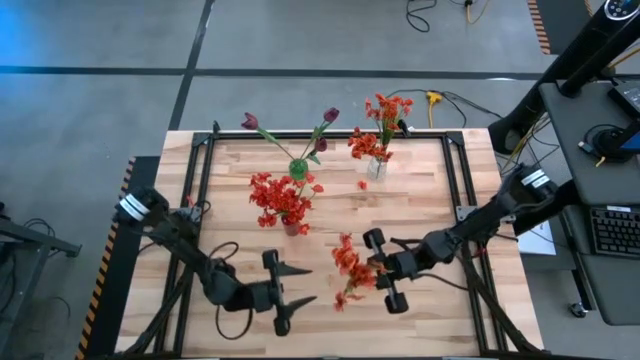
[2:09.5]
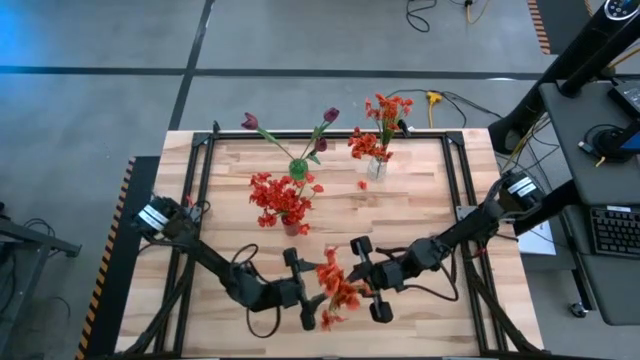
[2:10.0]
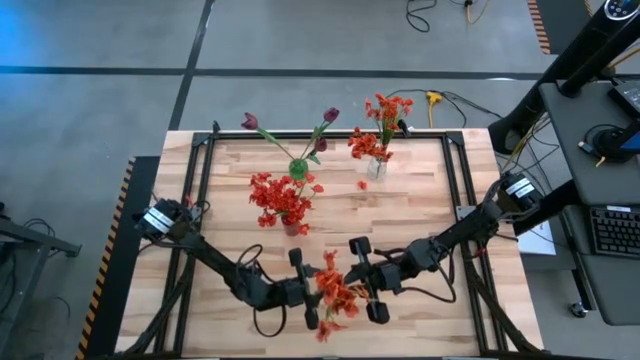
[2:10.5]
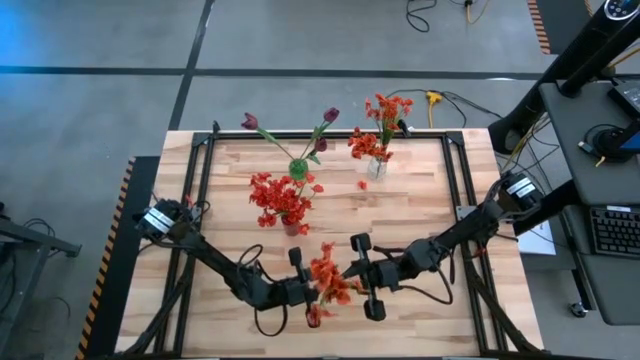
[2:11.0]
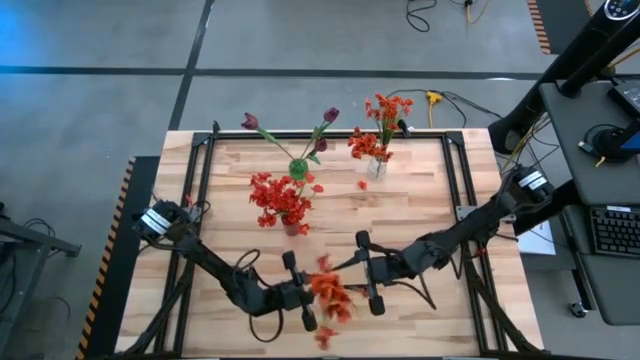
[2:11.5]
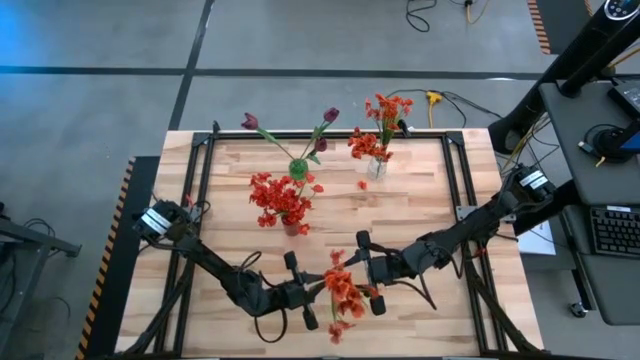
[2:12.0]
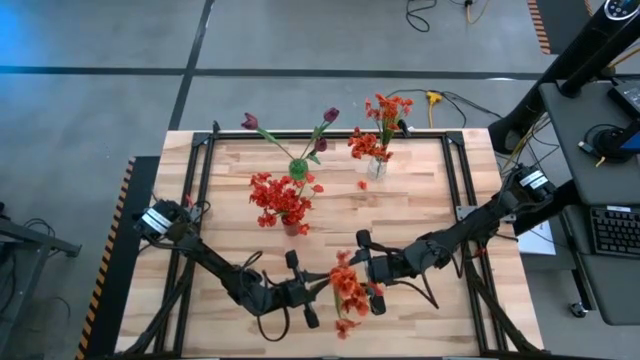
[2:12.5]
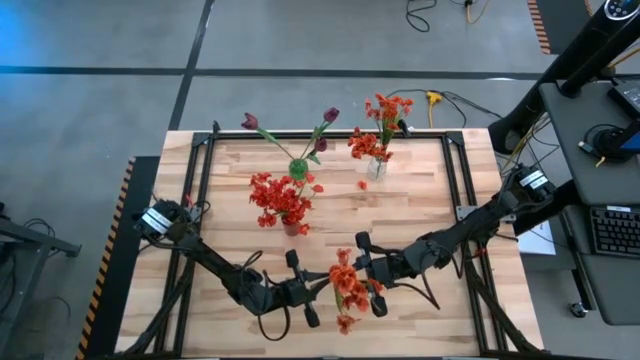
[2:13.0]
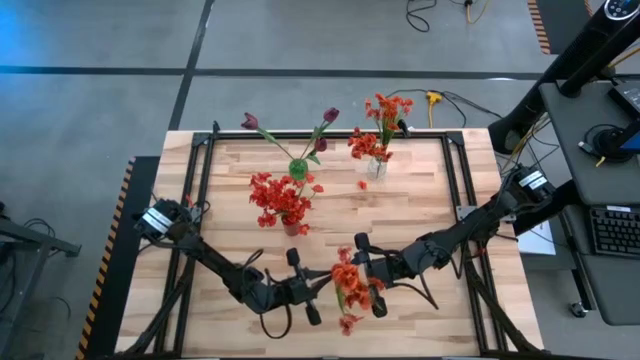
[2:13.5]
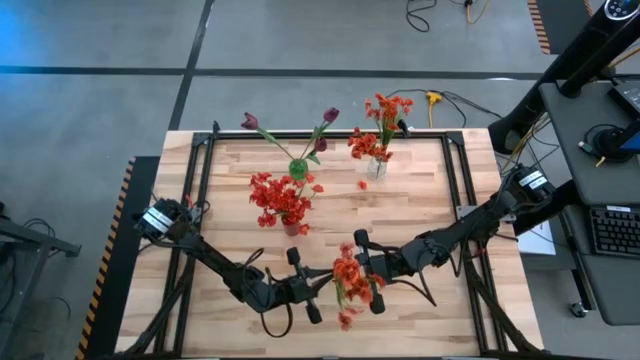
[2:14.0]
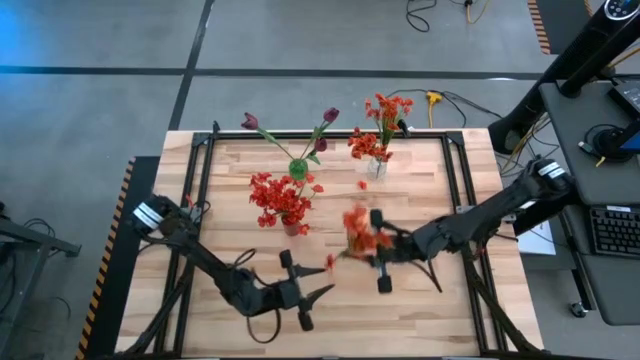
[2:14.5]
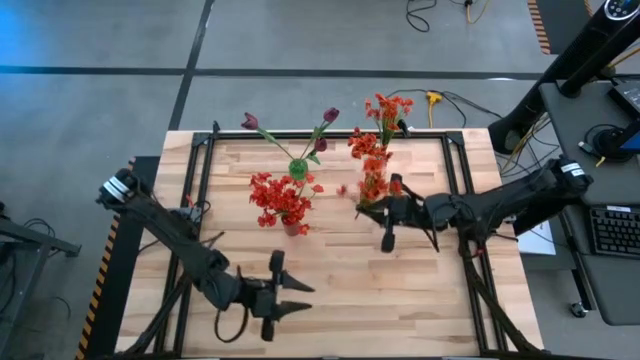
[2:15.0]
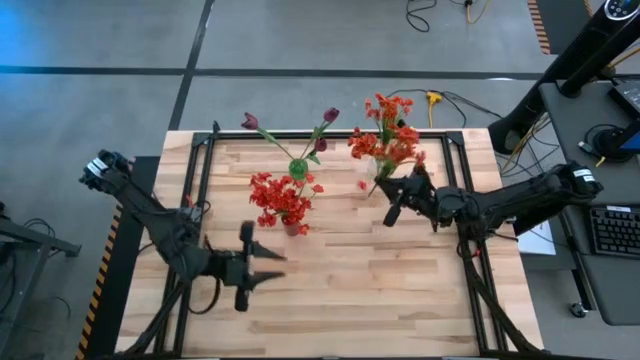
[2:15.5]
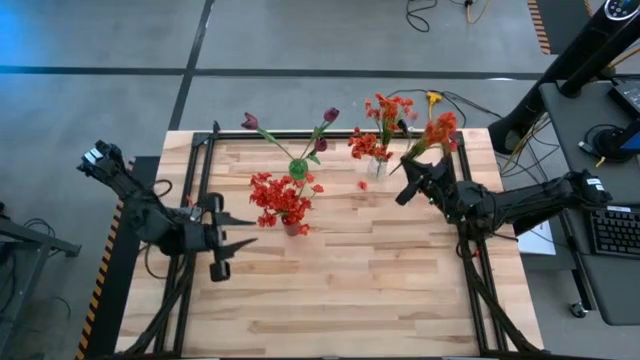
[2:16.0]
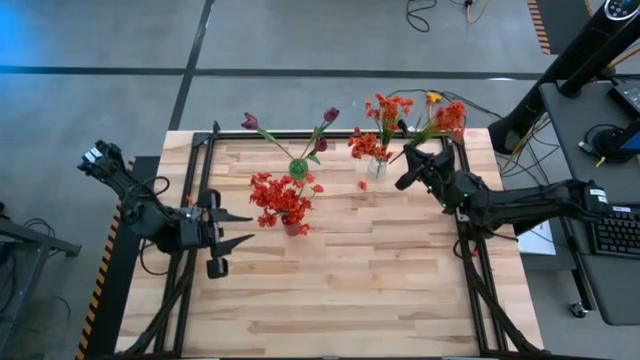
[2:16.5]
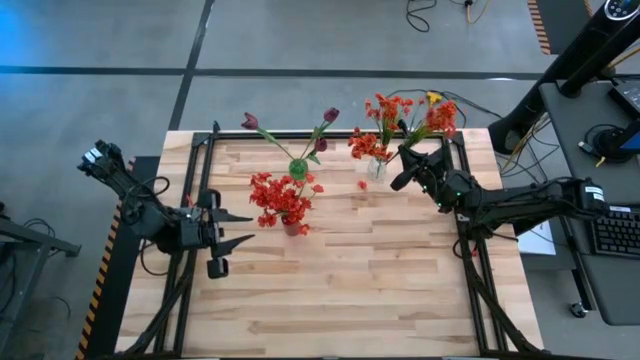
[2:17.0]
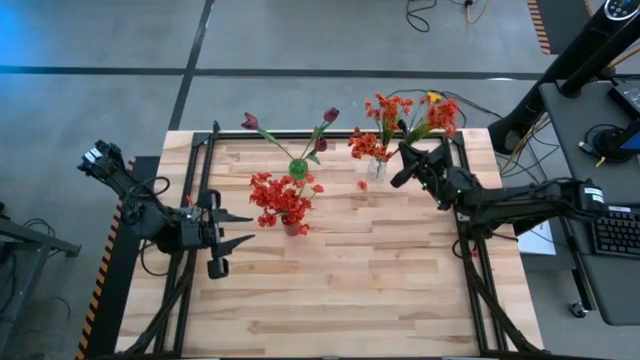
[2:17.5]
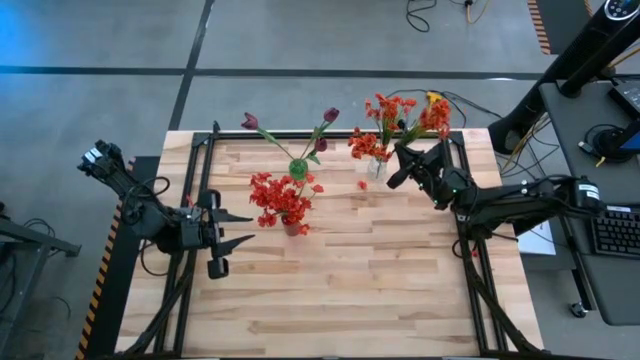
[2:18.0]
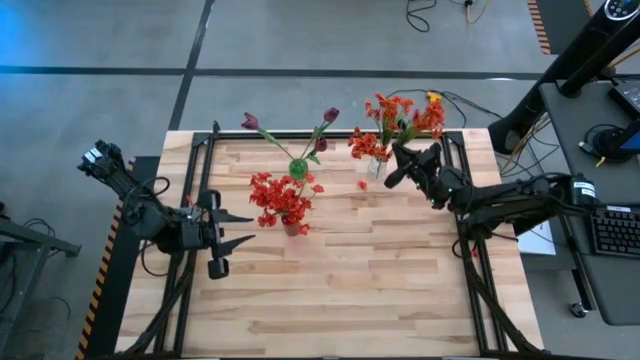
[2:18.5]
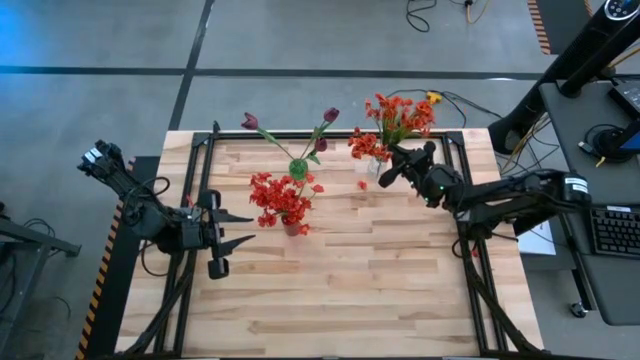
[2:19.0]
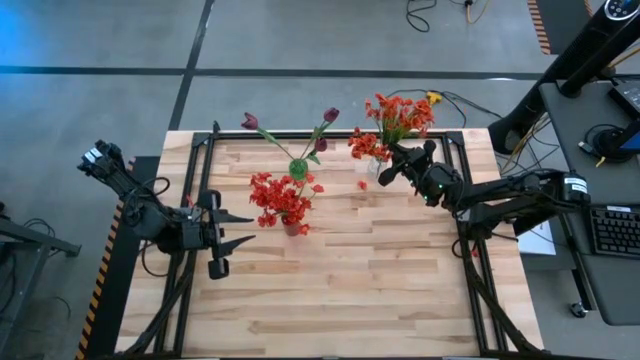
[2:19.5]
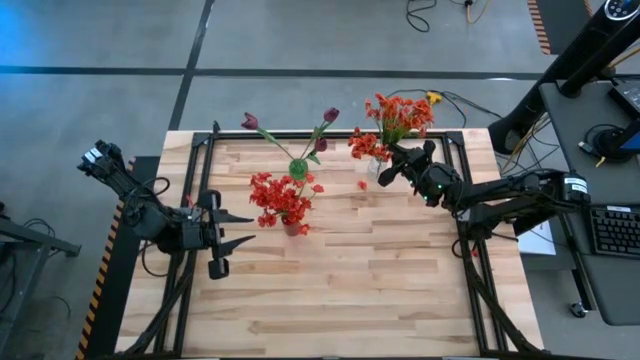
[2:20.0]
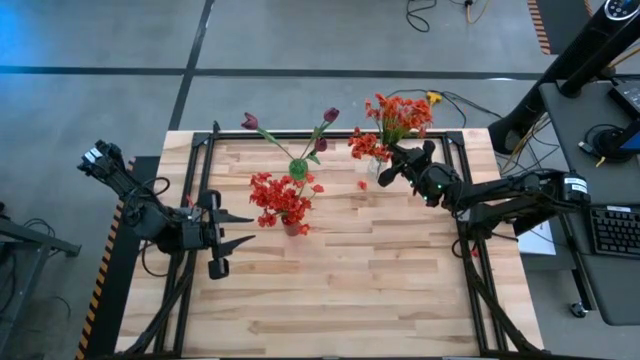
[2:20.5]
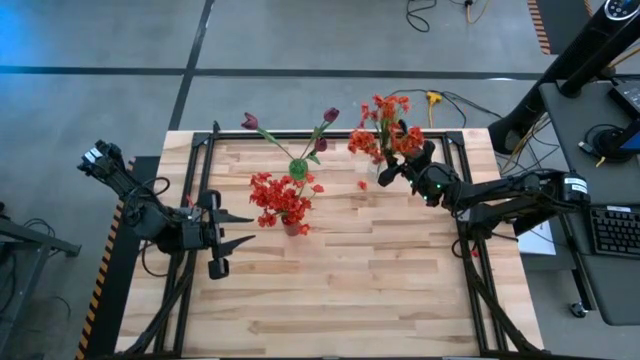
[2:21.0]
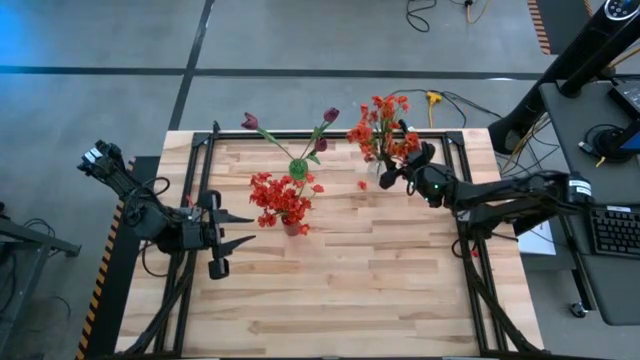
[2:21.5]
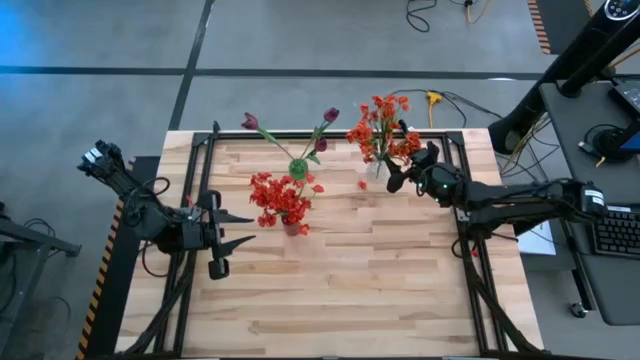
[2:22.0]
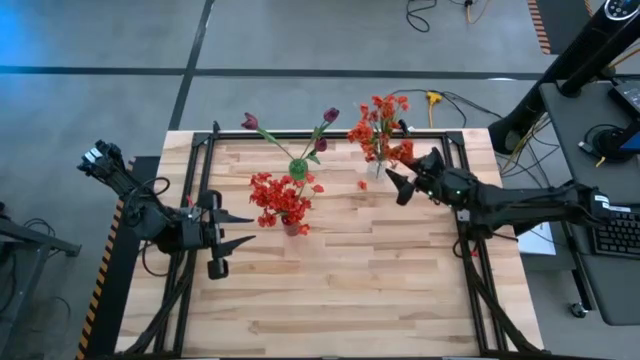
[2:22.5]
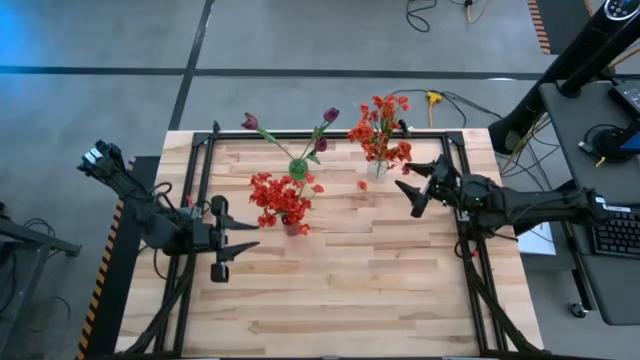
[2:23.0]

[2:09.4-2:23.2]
Task: Sort flowers into vase by color
Put the orange flowers into the clear vase

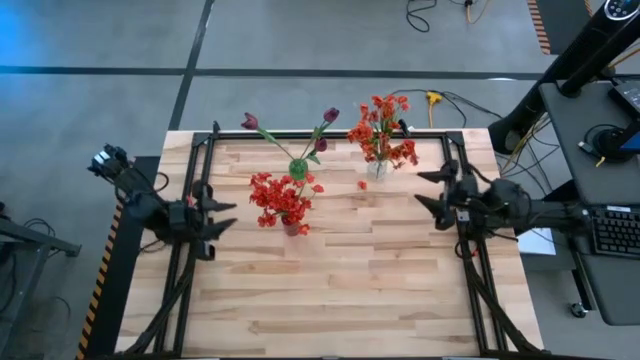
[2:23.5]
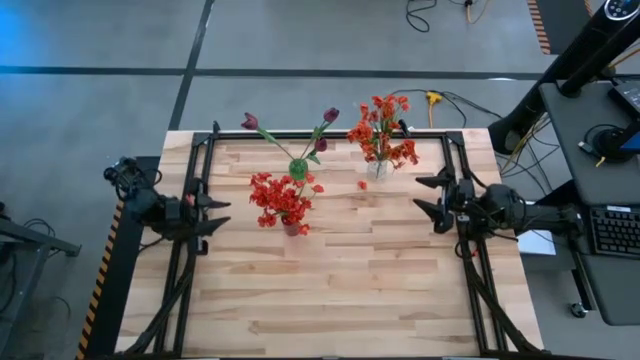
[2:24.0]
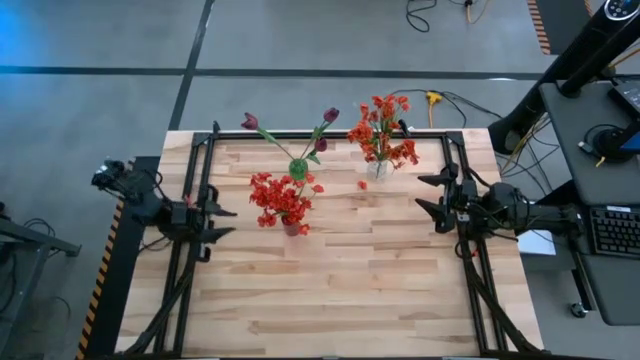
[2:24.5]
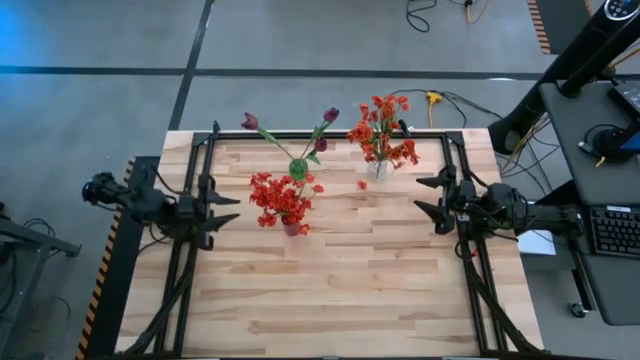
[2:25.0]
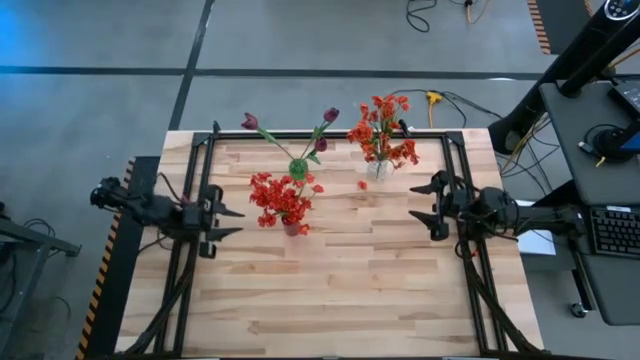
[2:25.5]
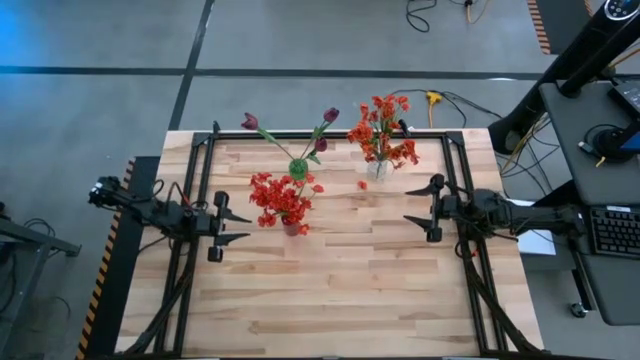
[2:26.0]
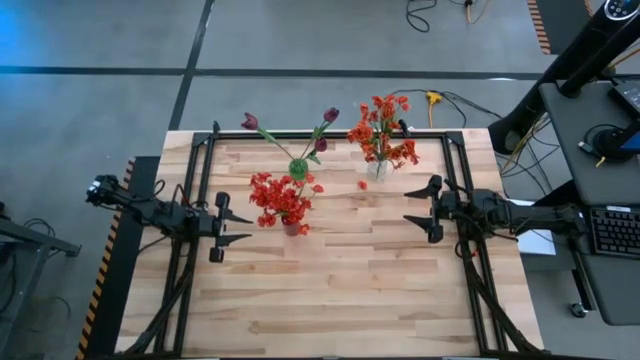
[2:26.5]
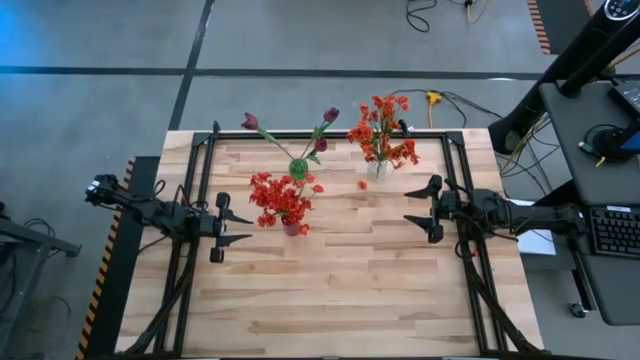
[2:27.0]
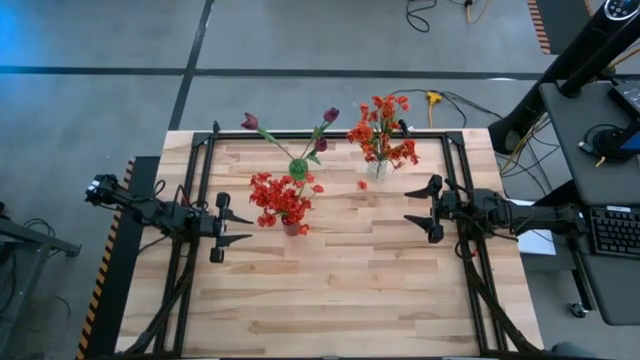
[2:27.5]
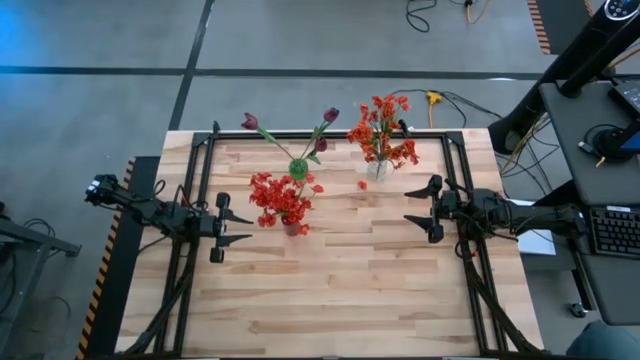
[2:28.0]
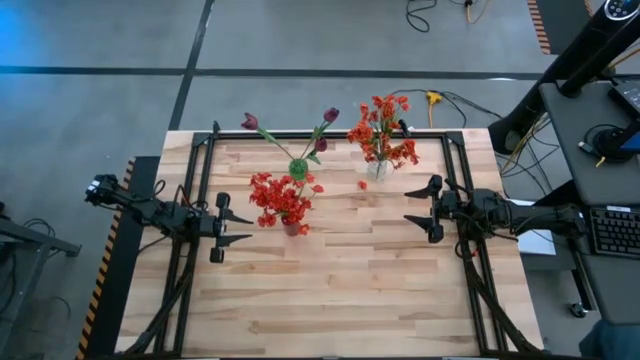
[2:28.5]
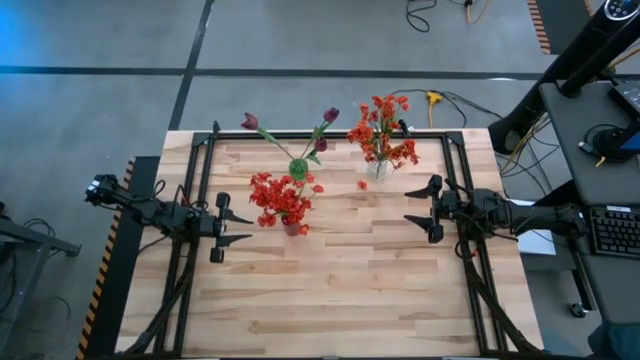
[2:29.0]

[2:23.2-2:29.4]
Return to Home Position

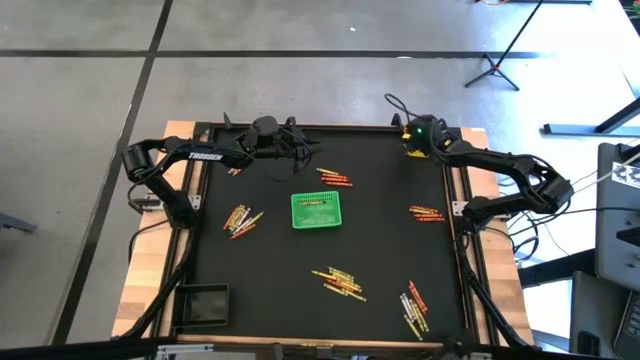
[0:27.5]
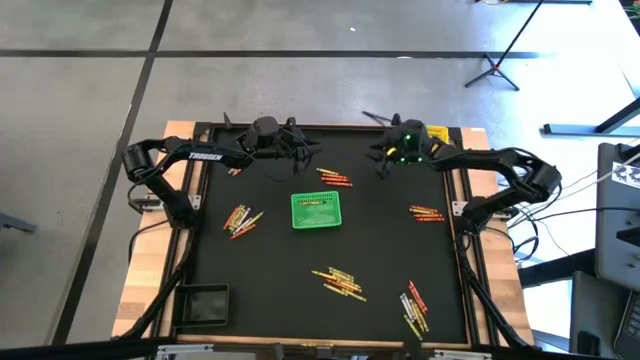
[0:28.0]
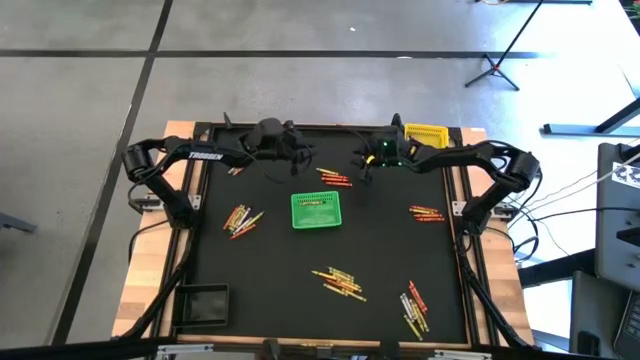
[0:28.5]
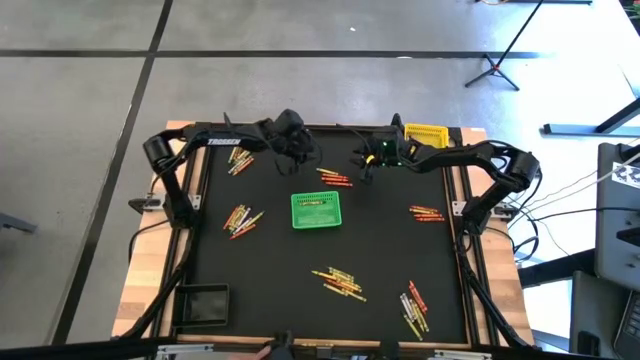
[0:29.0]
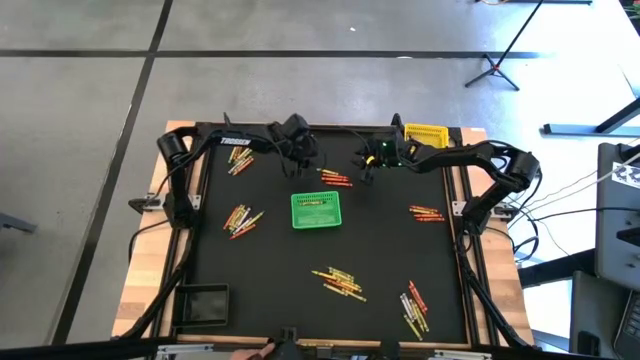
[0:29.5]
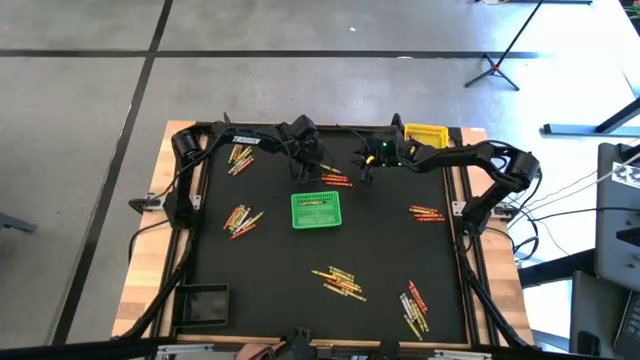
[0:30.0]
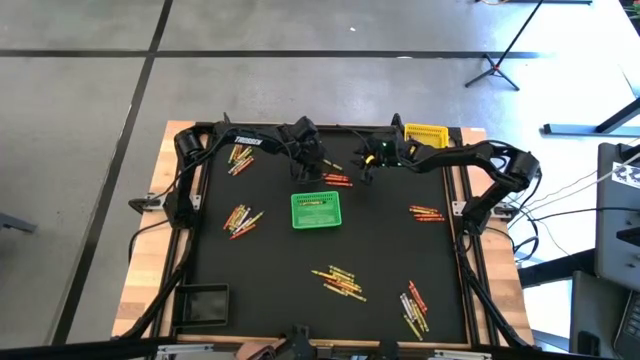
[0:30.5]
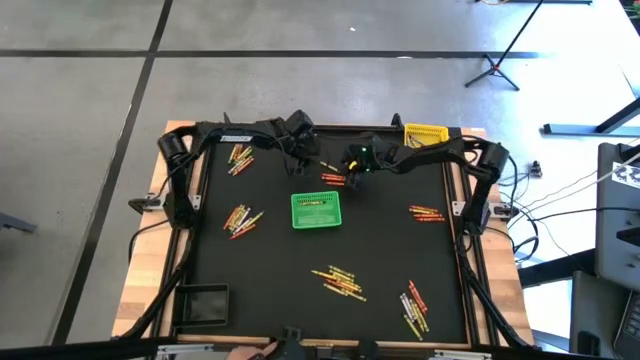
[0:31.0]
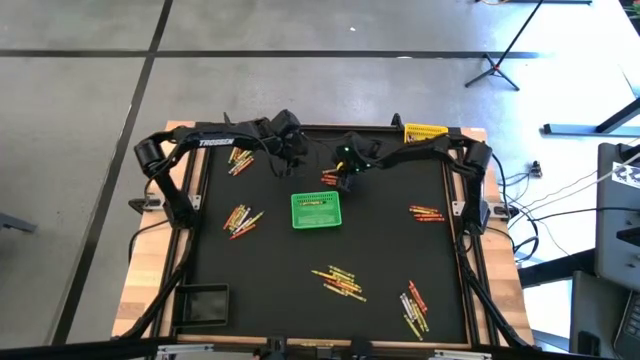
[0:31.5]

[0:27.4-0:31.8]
Task: Sort crayons
Put the green crayon into the green bin
